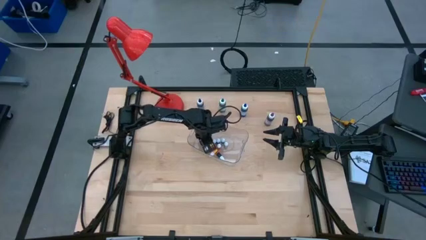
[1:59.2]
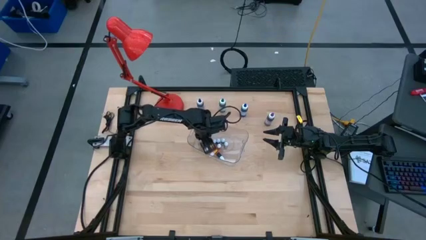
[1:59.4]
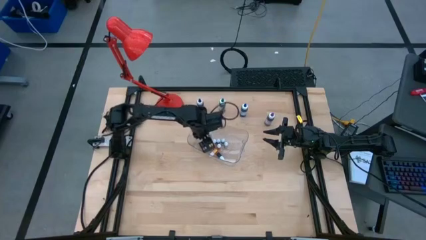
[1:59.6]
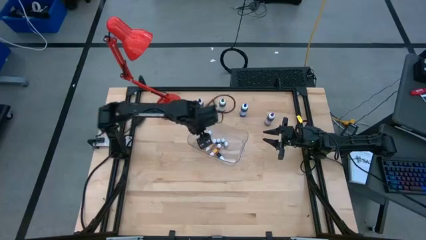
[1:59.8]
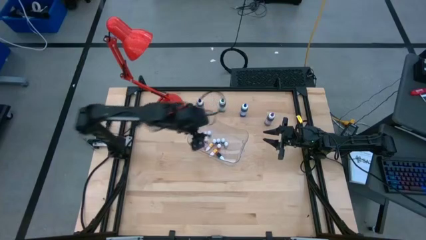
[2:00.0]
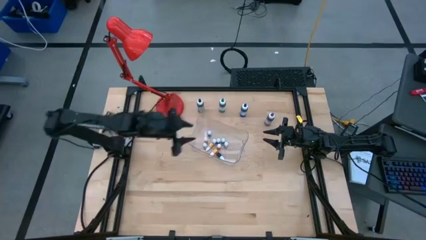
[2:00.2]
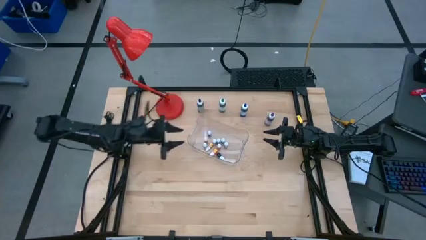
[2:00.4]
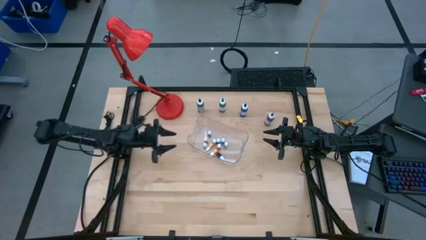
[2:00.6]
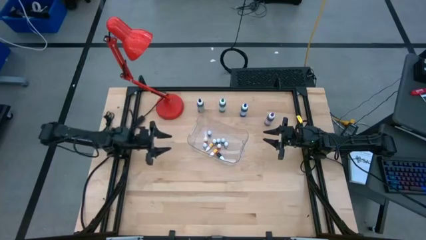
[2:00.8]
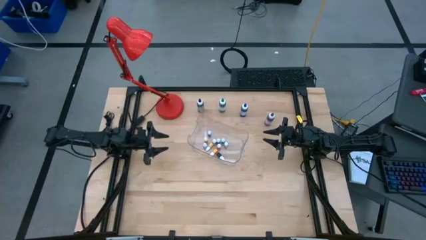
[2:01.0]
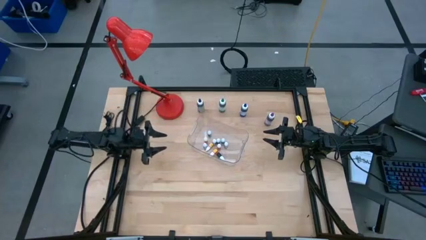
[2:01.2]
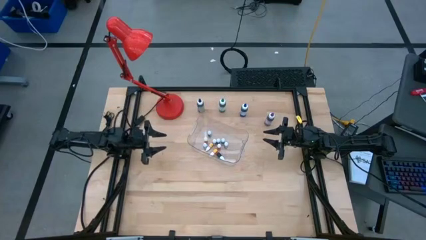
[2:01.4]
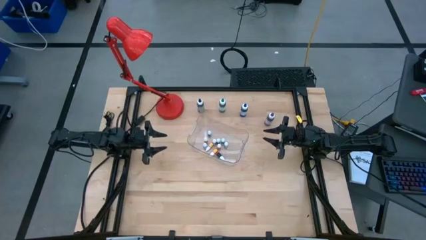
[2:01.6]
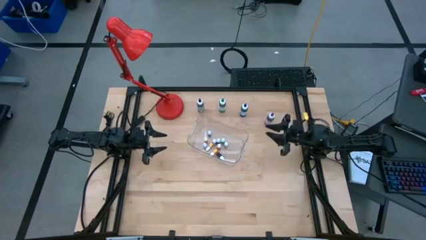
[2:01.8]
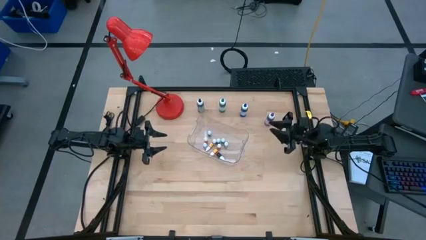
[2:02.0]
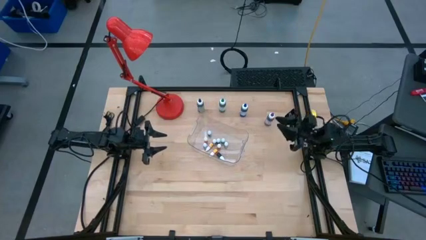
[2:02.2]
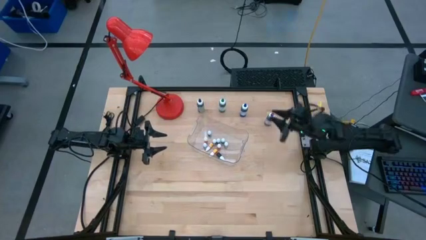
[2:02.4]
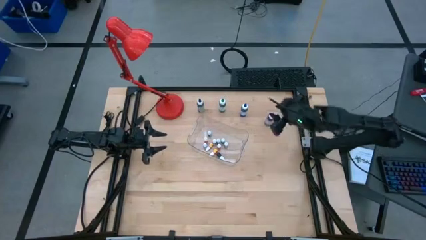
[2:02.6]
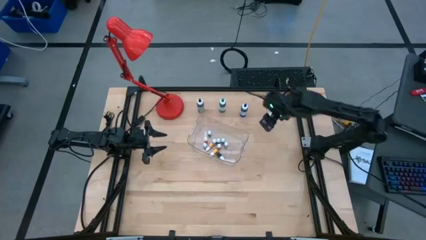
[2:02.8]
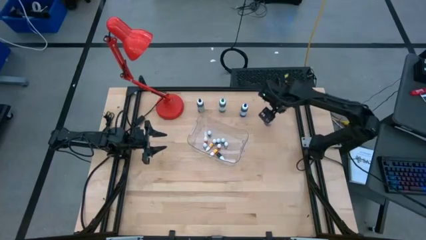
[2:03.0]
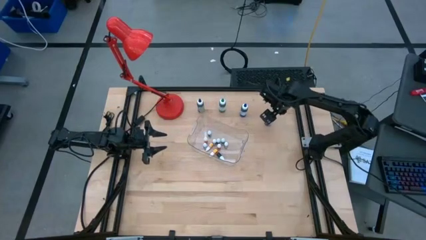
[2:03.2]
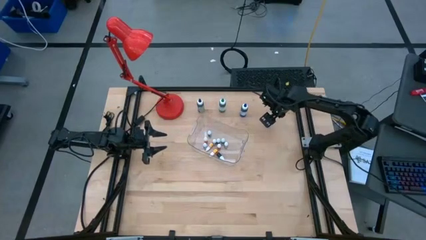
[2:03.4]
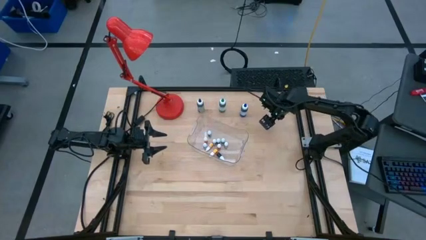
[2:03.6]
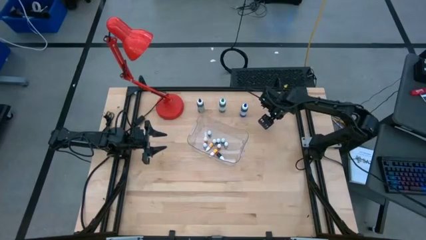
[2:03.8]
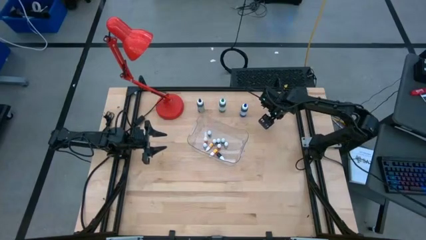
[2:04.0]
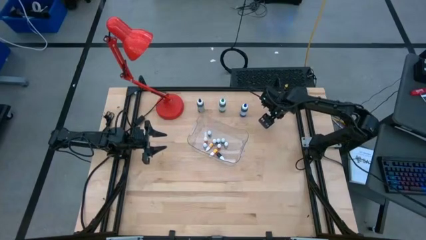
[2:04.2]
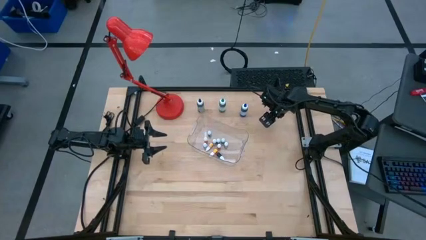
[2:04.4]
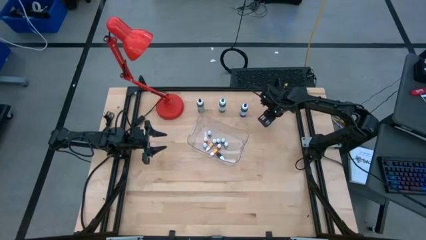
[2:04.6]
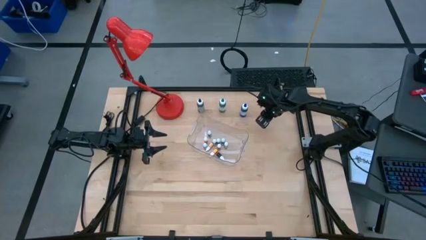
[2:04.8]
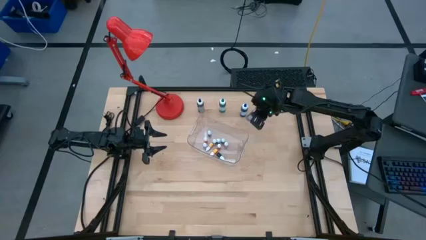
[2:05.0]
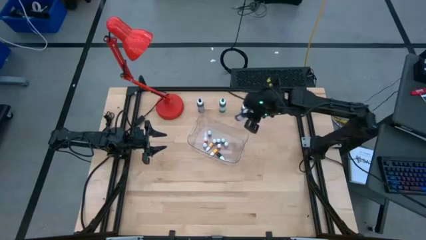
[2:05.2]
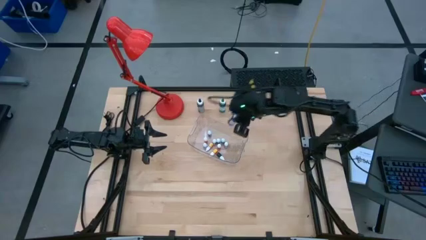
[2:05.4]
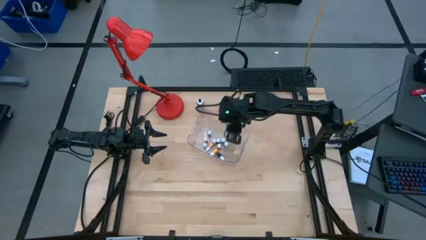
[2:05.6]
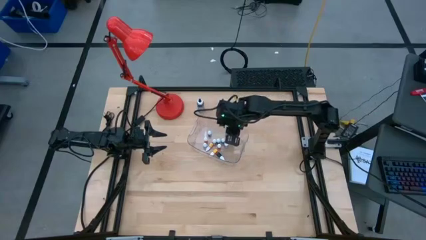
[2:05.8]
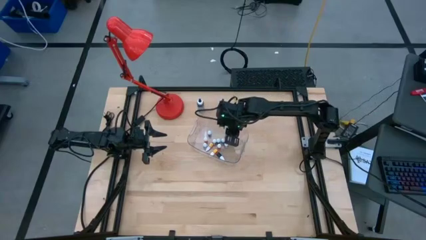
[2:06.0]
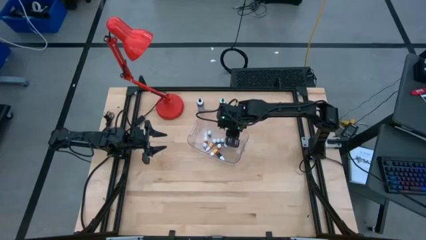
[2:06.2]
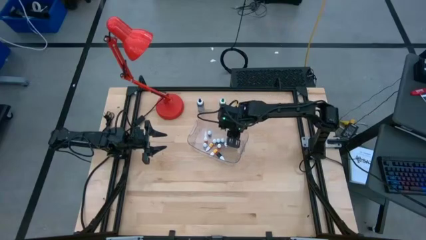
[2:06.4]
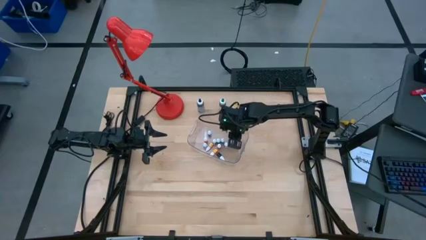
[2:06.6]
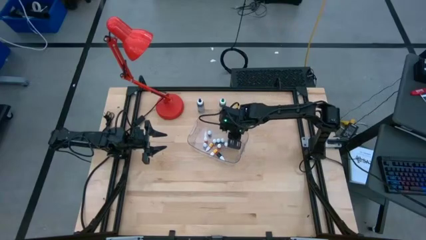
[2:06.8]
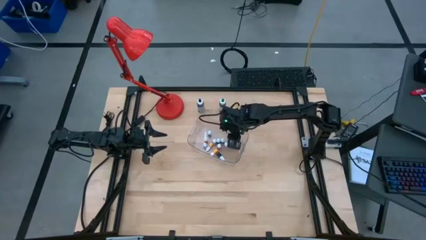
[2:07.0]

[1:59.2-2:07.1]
Task: Pick & Place food coloring
Put the big purple food coloring bottle in the transparent bin

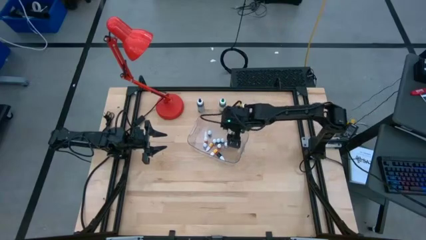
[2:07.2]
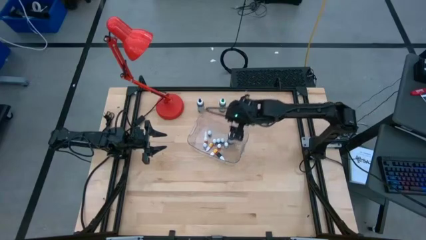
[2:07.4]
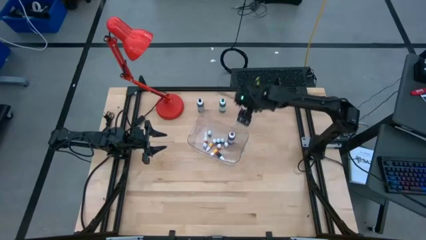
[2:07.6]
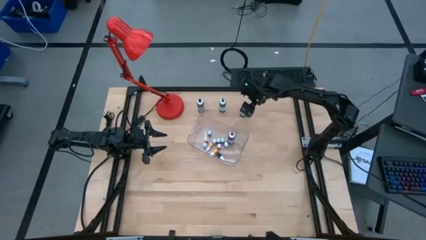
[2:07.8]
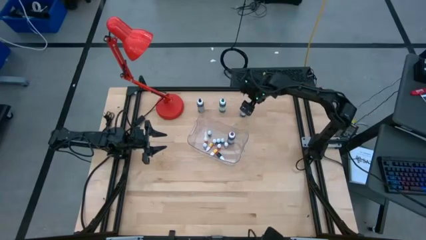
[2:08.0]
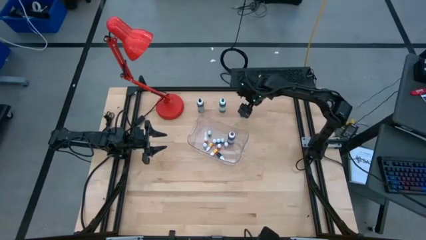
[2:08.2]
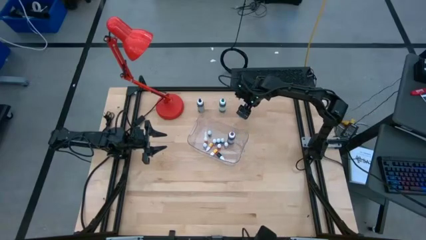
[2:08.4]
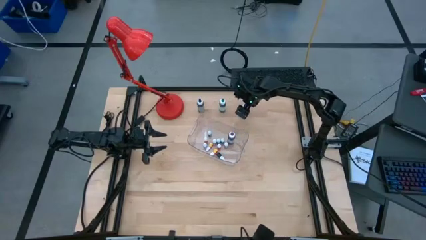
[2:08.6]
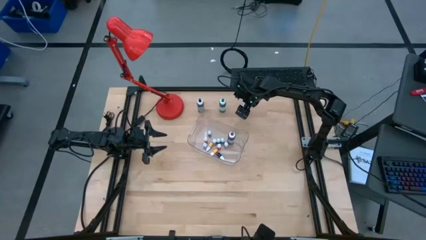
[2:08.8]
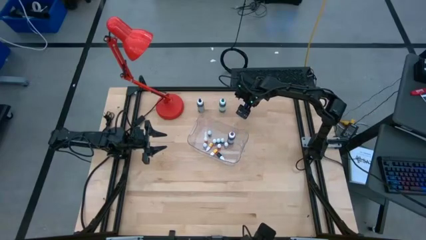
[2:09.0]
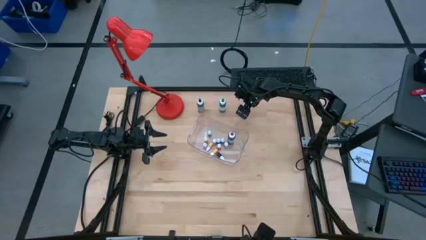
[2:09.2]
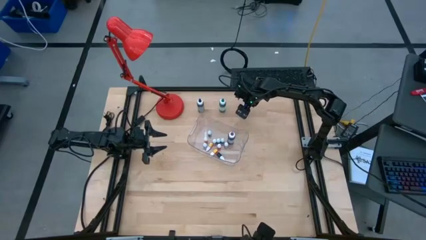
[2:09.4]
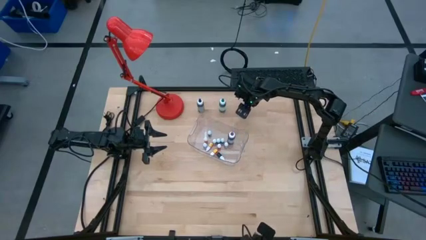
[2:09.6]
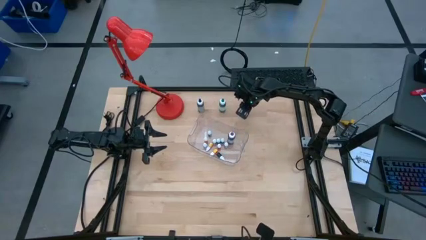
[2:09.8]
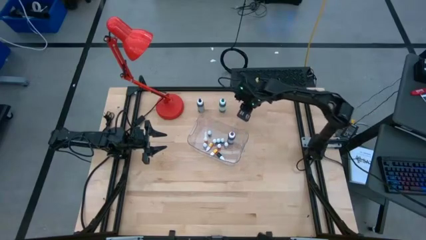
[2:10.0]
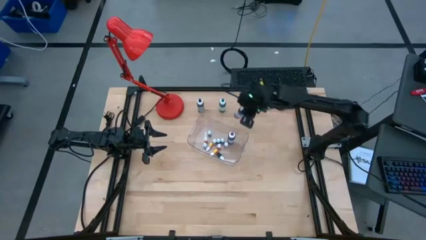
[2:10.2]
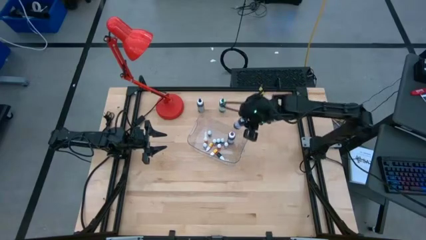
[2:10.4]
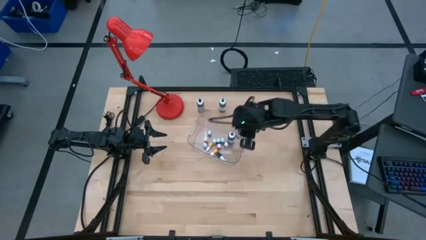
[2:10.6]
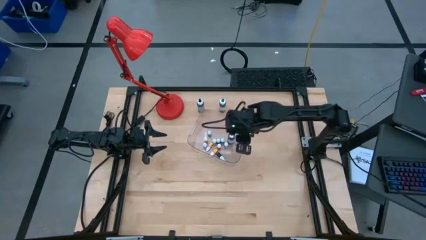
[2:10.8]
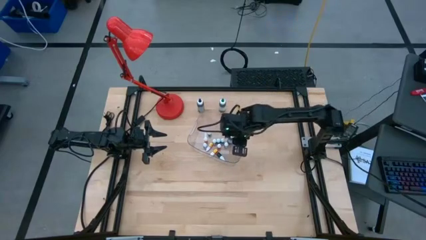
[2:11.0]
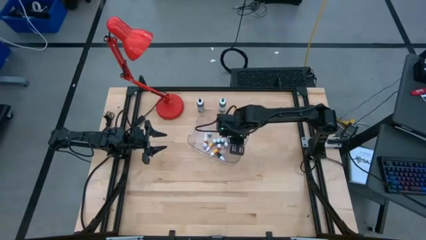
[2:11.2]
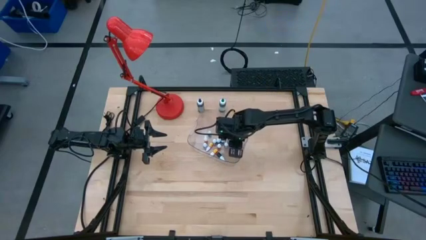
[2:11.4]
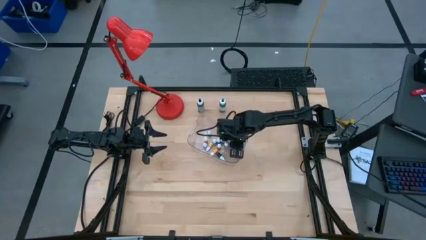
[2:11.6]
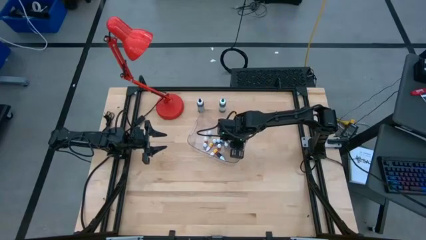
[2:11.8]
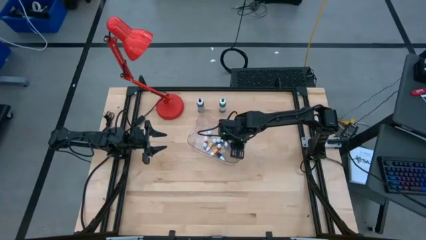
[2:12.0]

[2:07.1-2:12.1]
Put the big blue food coloring bottle in the transparent bin

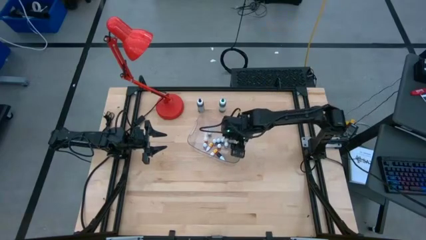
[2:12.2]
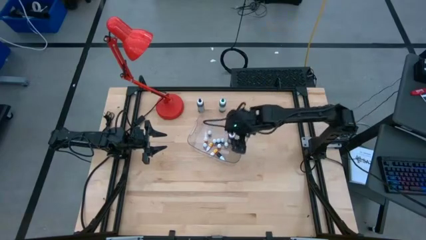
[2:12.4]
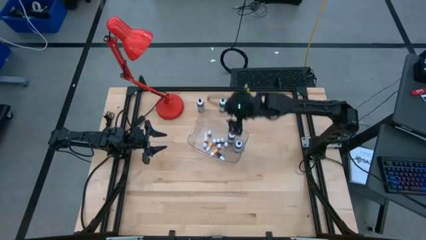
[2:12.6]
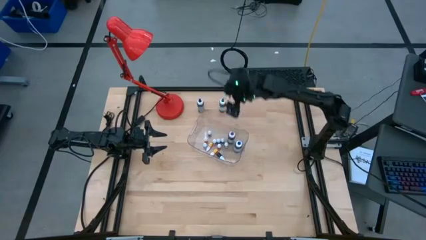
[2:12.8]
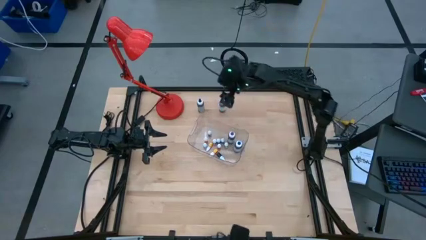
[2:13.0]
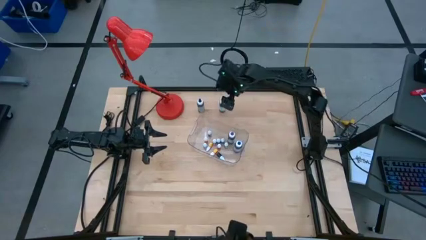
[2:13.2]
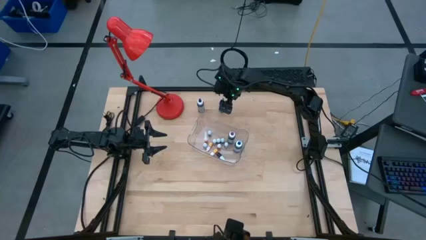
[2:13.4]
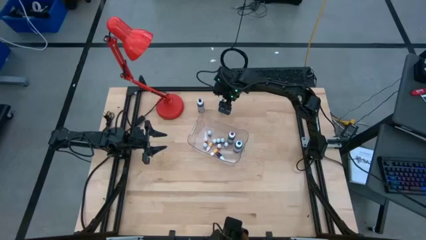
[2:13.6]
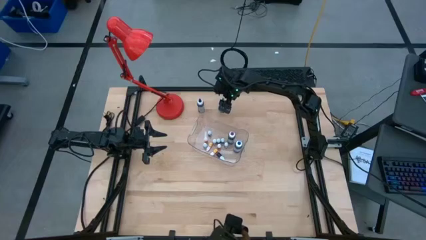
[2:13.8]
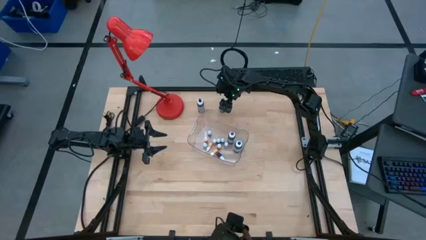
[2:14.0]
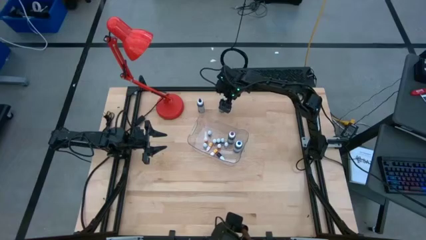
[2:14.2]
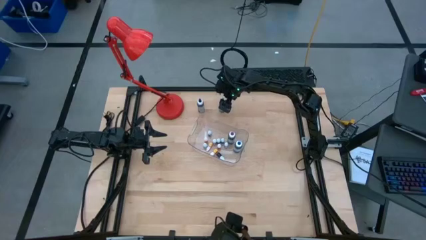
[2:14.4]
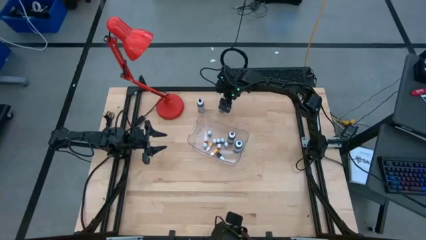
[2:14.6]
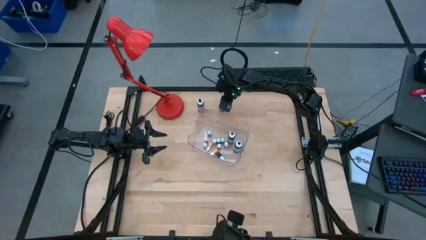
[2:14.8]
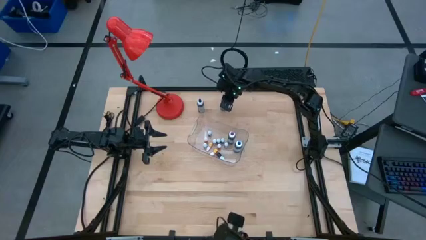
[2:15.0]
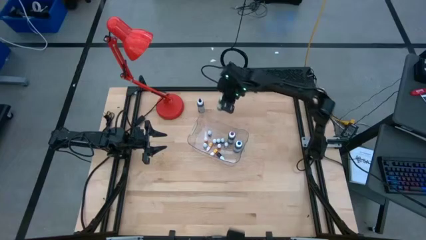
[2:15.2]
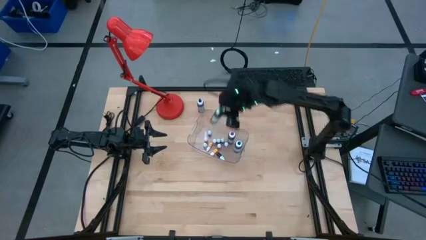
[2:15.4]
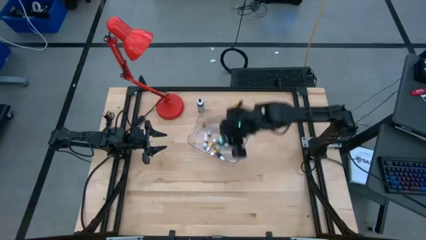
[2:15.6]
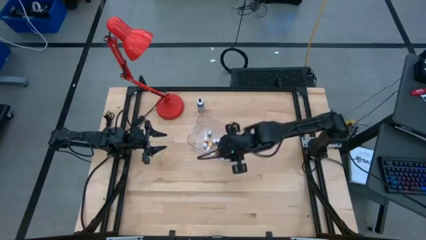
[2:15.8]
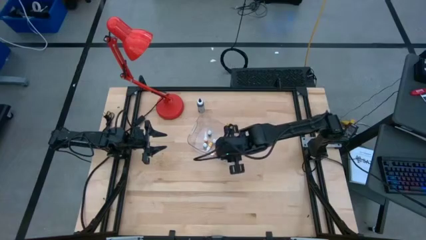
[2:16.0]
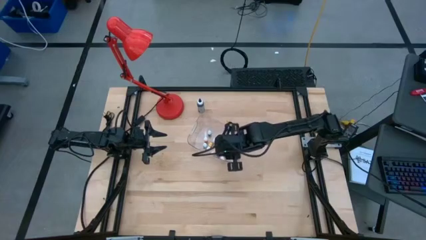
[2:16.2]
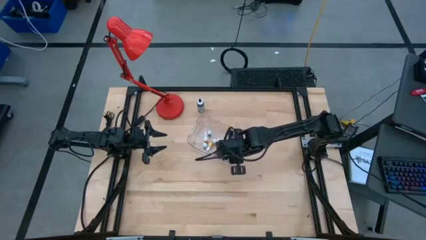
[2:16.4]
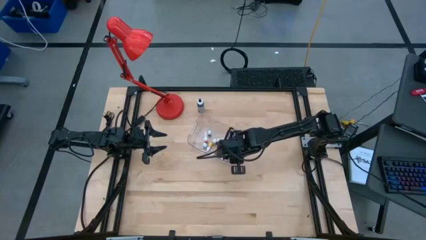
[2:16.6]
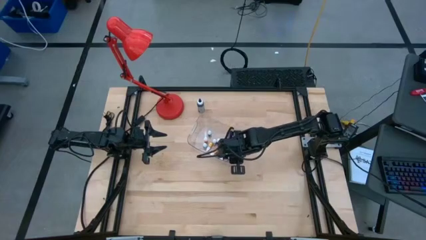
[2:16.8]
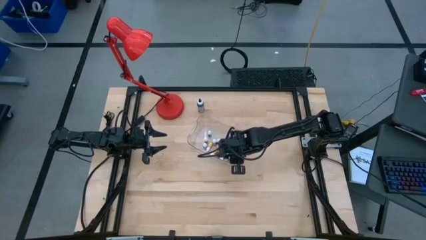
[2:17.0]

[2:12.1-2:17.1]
Put the big green food coloring bottle in the transparent bin
